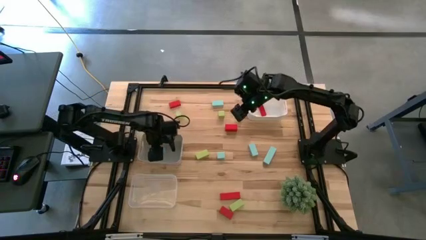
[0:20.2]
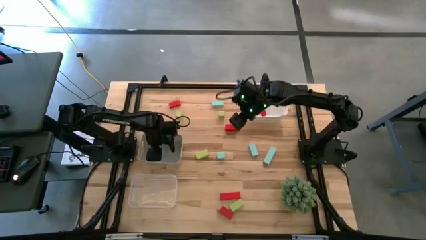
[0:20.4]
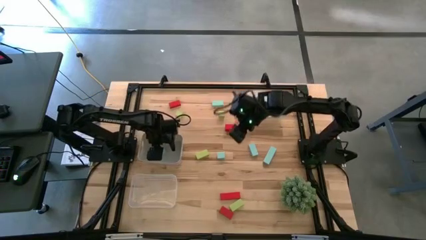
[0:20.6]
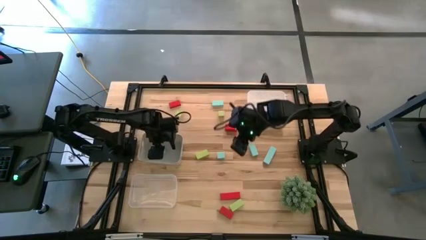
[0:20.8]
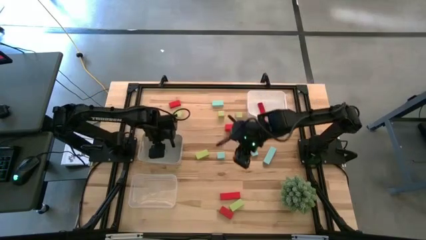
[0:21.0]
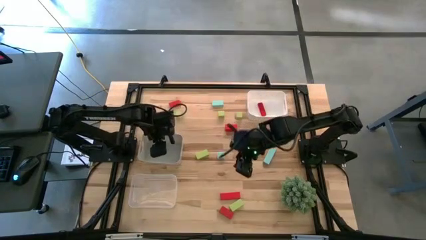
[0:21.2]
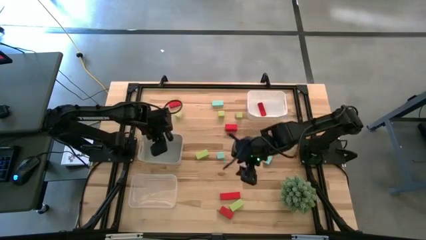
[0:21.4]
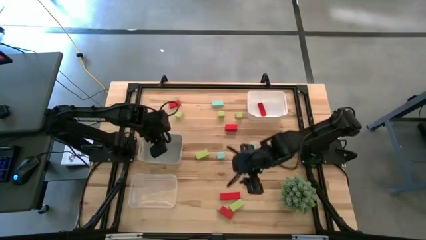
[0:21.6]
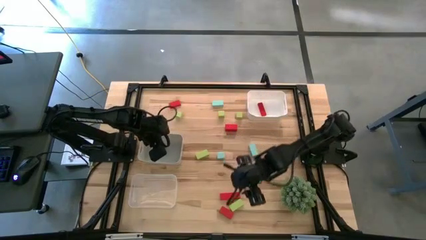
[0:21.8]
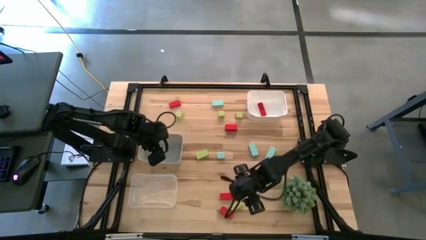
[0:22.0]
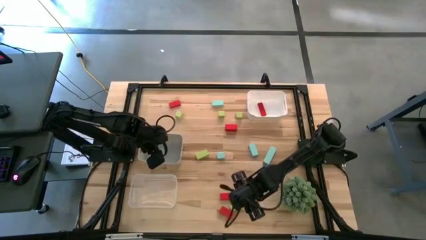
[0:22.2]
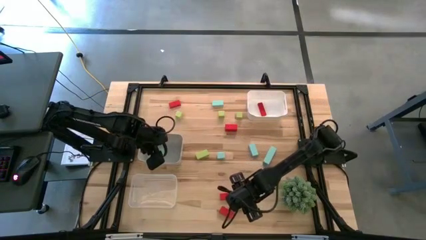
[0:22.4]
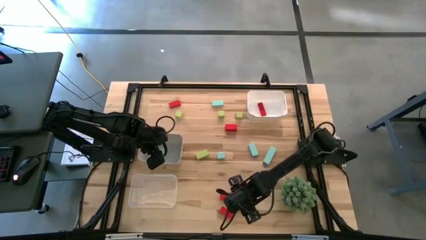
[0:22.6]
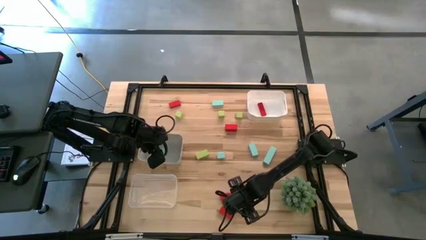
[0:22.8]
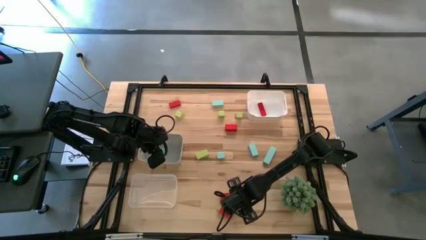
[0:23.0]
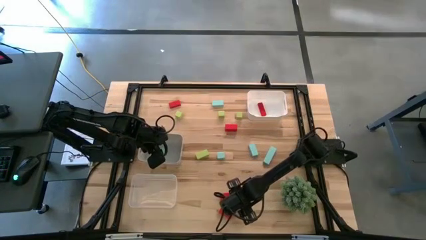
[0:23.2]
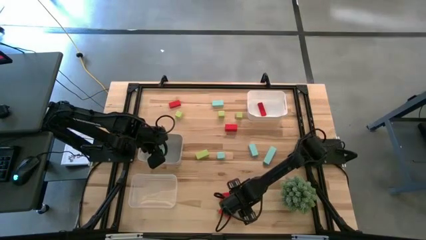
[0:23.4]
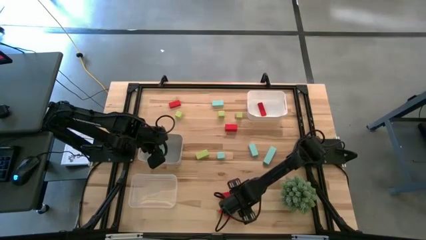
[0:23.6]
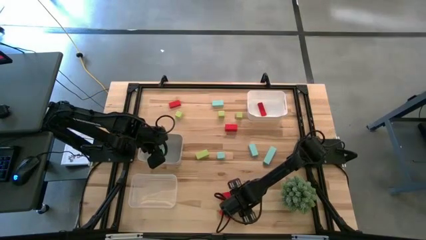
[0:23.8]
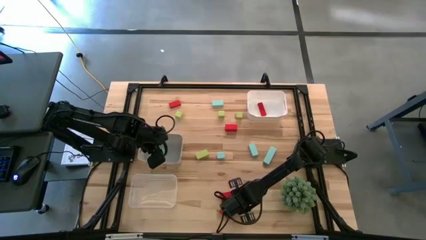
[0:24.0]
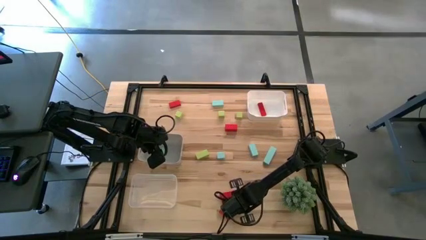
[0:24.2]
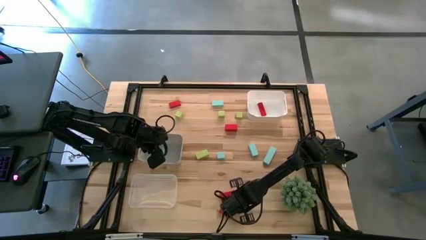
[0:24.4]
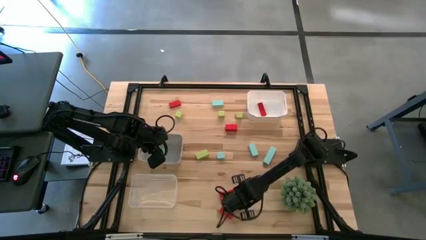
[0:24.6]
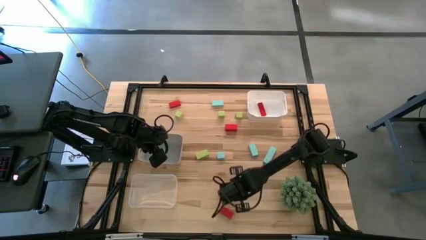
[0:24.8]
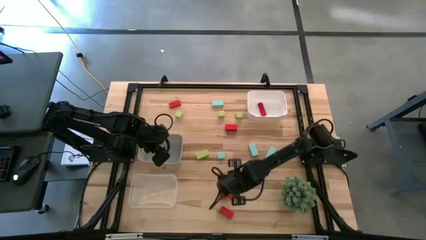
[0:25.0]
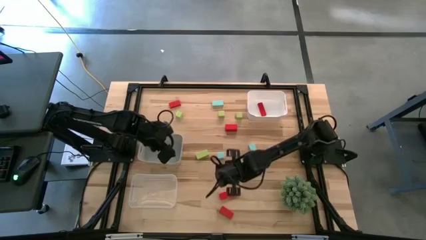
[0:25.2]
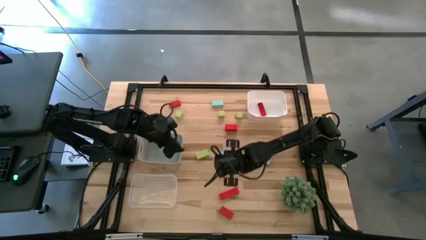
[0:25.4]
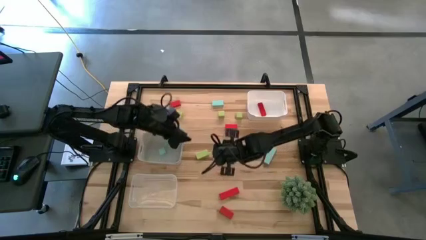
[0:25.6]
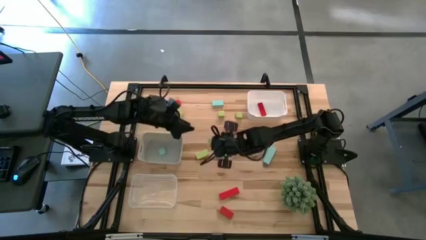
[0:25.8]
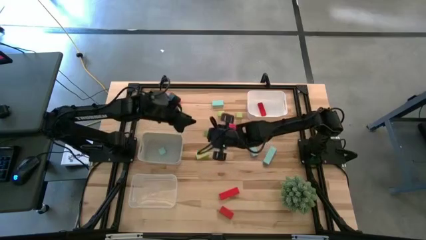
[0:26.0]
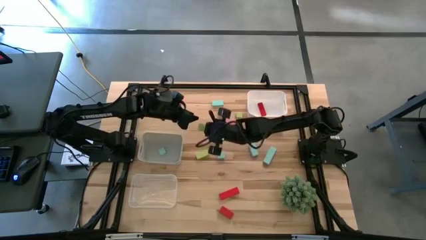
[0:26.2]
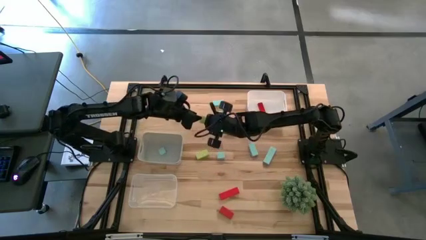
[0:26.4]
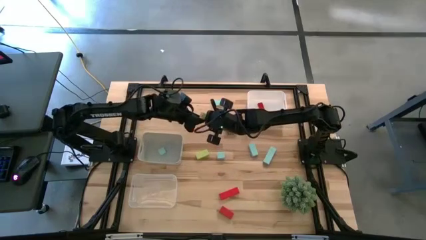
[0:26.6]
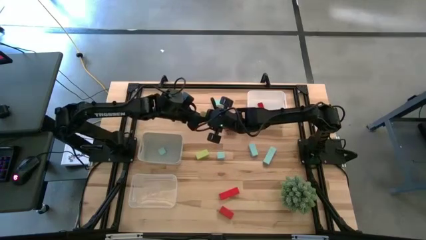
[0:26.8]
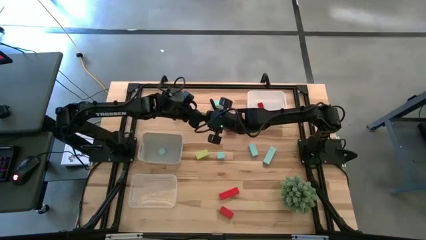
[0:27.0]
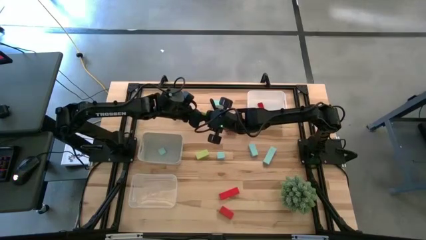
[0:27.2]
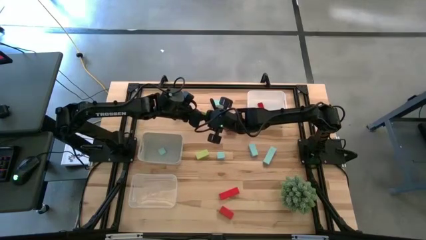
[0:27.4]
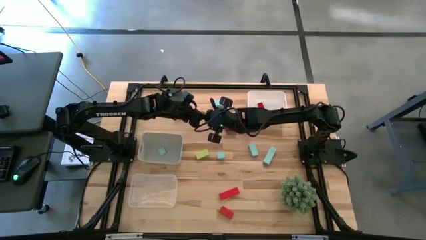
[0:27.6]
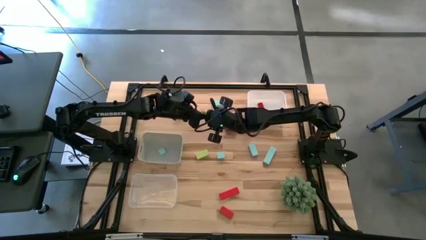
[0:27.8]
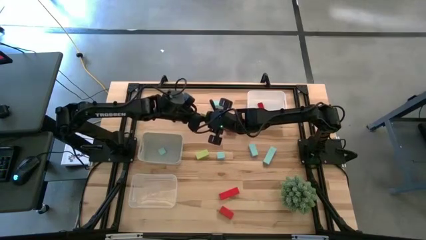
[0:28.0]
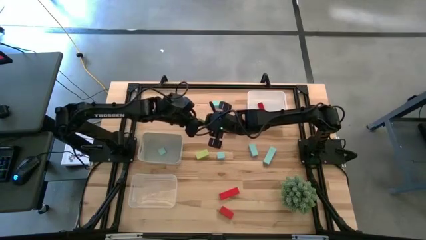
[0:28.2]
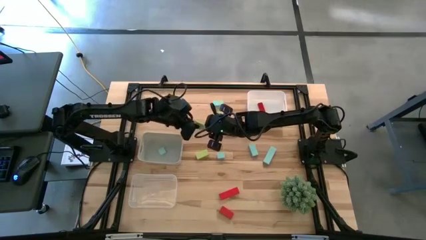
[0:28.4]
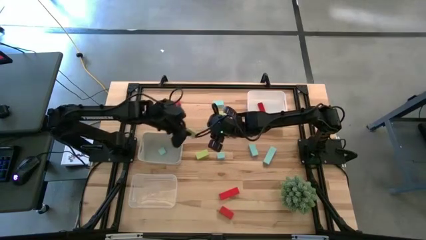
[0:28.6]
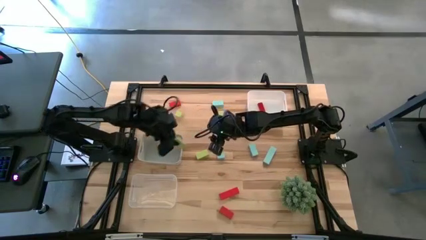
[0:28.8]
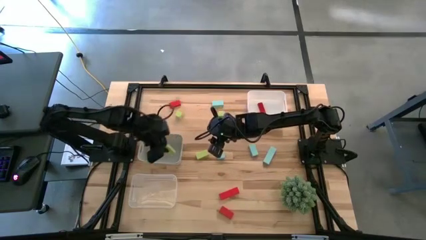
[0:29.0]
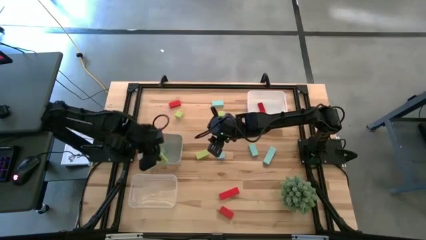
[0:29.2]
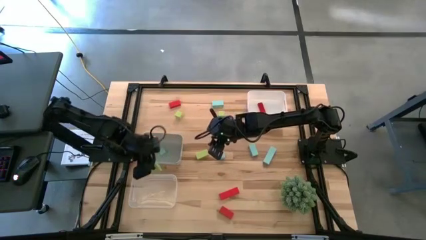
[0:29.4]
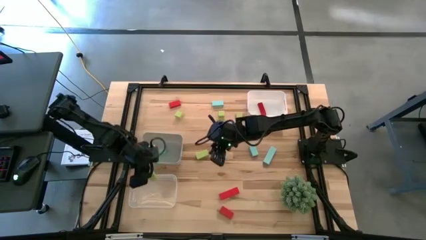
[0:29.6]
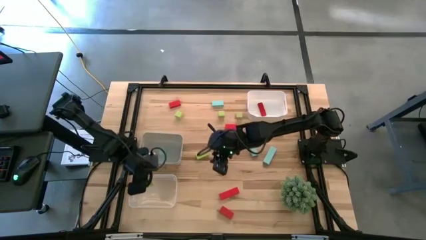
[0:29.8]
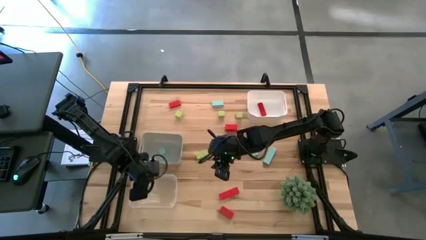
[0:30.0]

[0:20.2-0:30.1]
Task: Sort & place blocks by color
Put the green block into the transparent bin

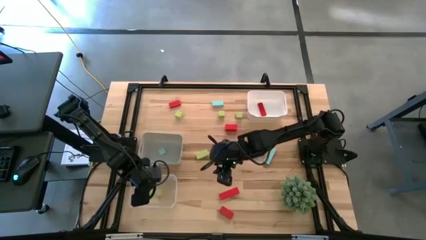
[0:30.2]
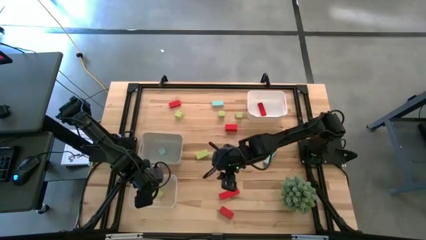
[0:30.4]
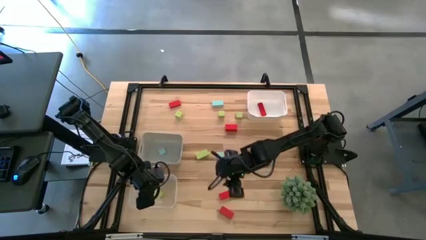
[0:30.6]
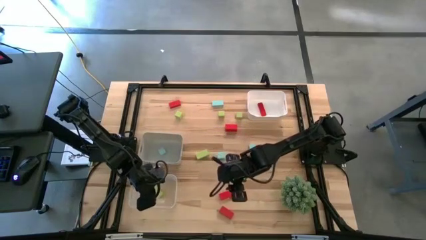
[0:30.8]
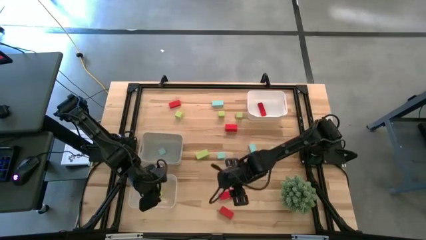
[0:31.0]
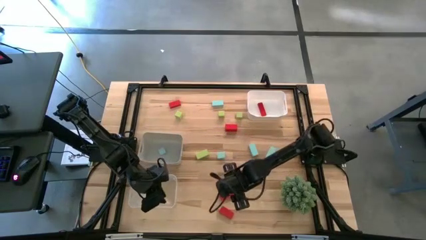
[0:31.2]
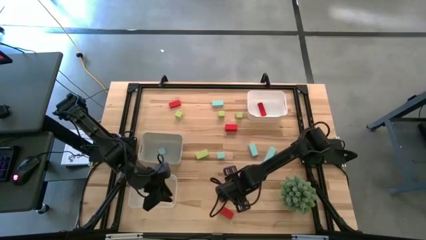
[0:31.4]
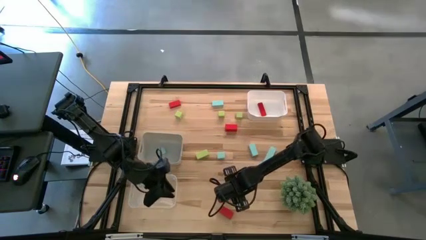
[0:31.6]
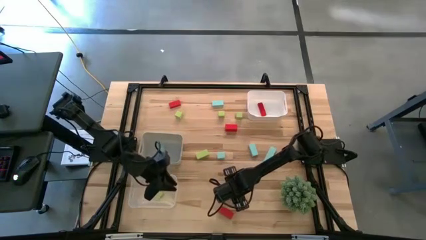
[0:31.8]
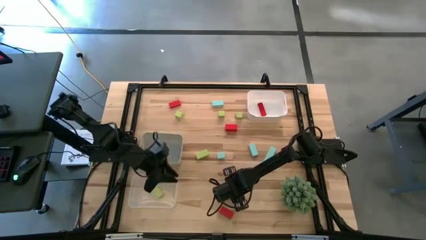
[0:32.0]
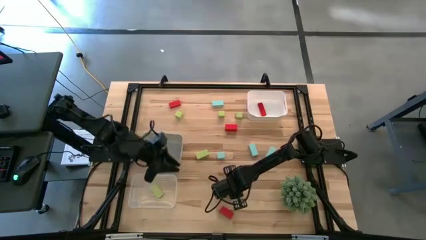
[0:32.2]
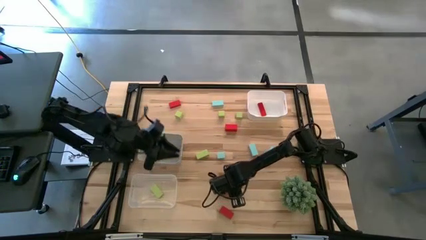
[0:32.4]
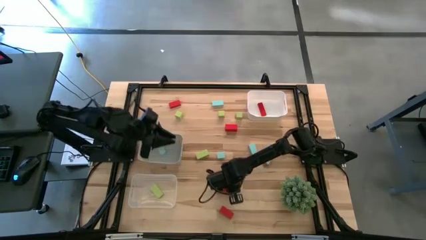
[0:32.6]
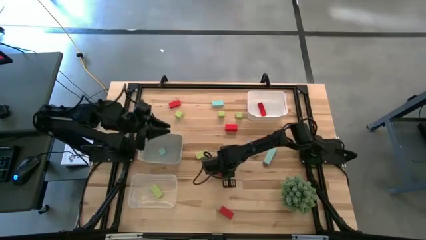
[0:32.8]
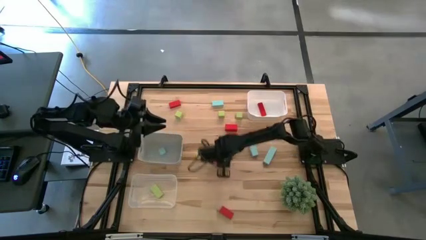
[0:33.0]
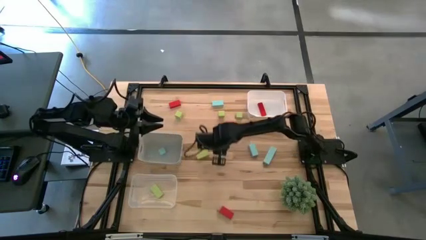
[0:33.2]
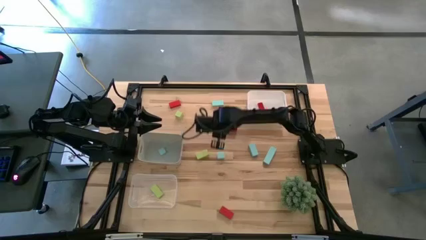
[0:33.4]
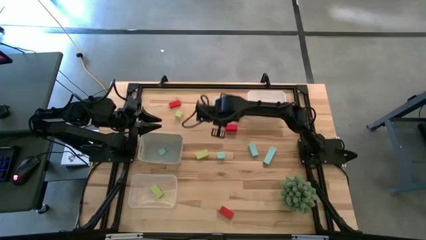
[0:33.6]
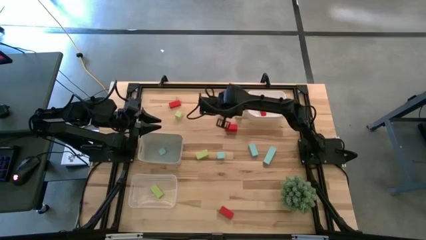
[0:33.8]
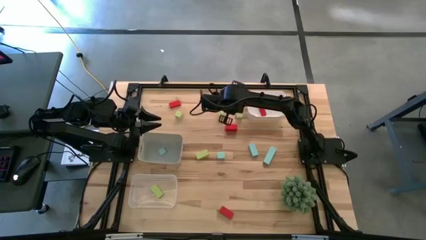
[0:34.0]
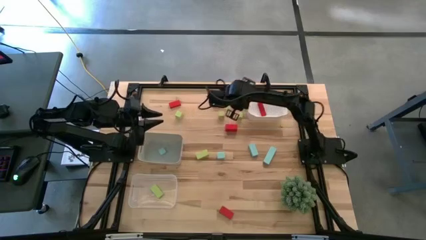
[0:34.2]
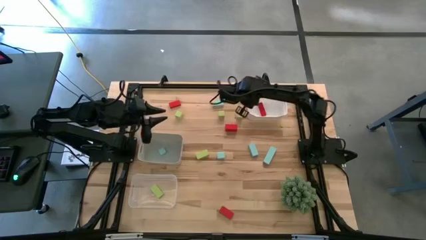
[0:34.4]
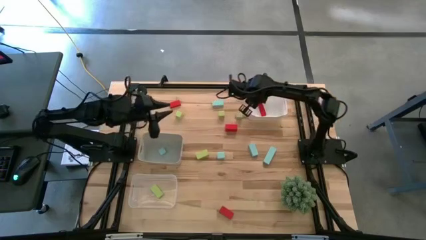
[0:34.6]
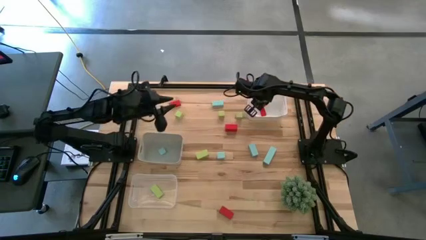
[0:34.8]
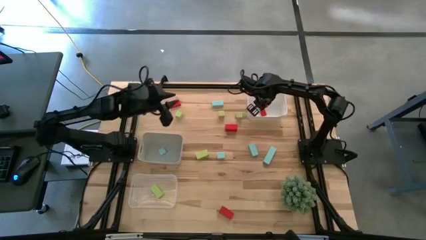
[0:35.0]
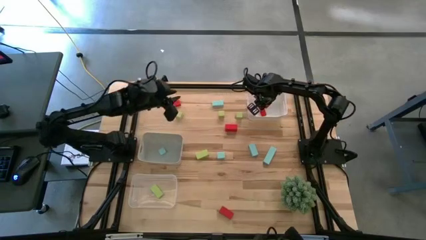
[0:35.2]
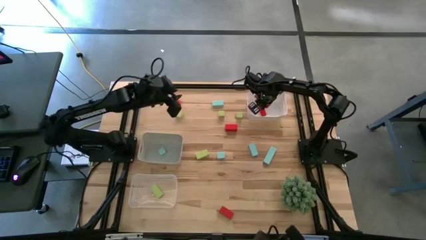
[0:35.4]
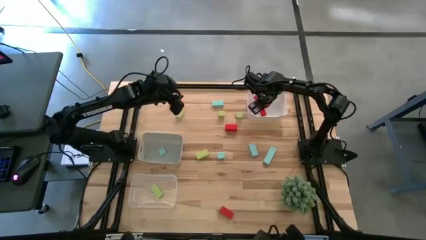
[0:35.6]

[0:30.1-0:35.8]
Put the red block into the white bin
